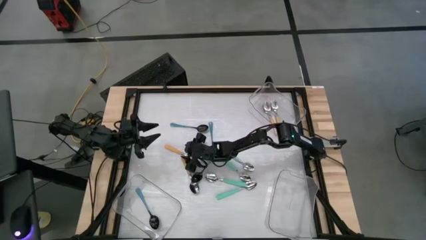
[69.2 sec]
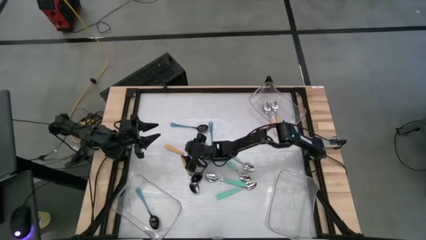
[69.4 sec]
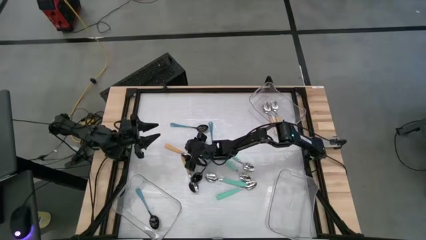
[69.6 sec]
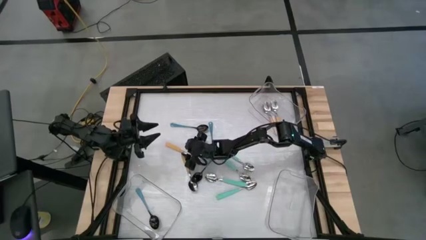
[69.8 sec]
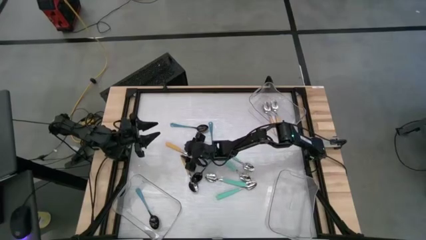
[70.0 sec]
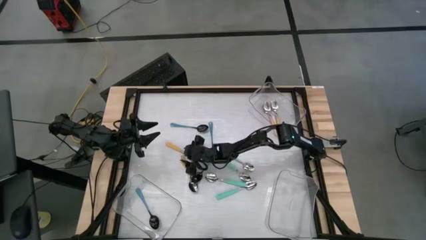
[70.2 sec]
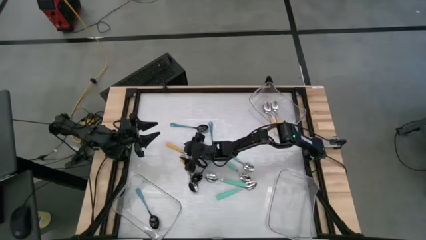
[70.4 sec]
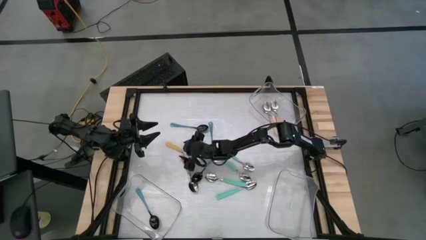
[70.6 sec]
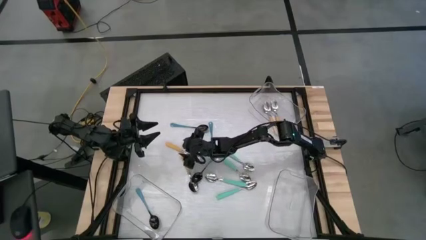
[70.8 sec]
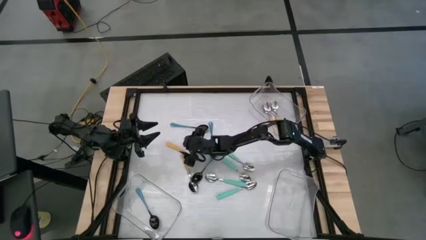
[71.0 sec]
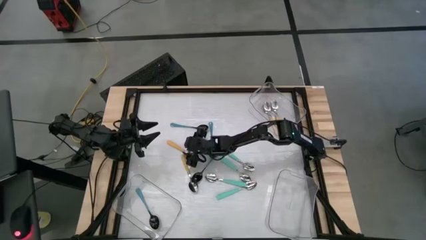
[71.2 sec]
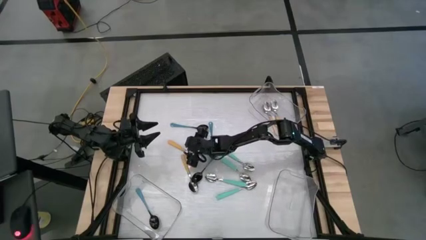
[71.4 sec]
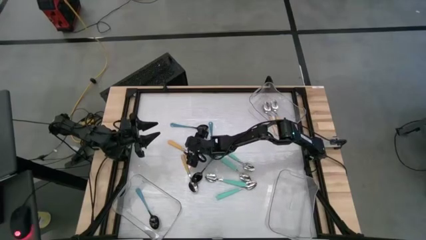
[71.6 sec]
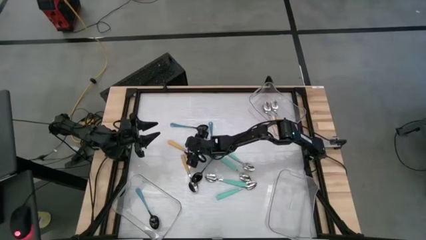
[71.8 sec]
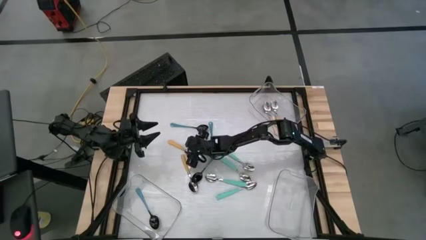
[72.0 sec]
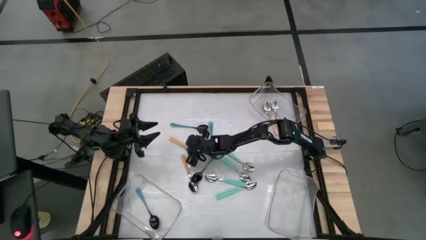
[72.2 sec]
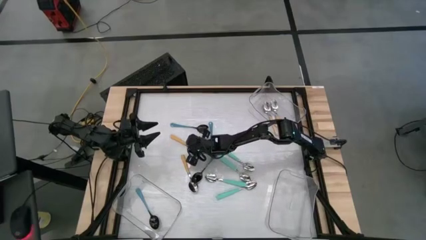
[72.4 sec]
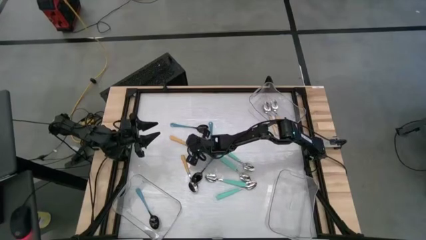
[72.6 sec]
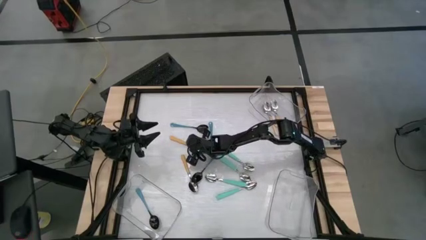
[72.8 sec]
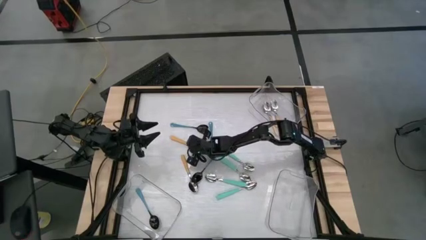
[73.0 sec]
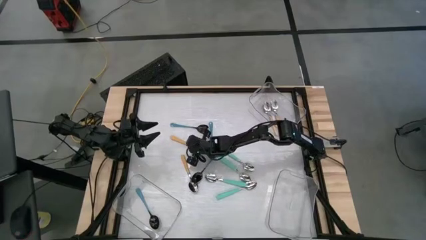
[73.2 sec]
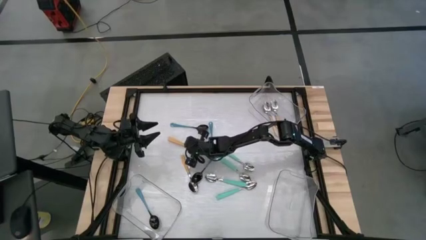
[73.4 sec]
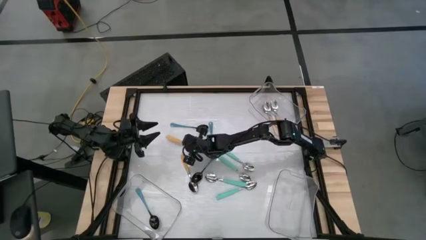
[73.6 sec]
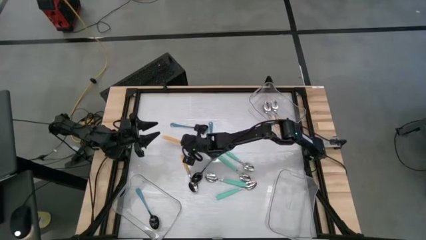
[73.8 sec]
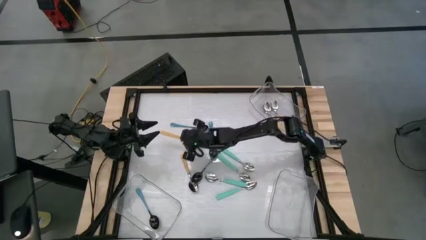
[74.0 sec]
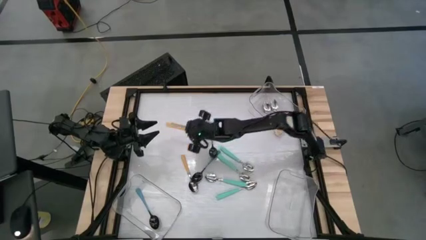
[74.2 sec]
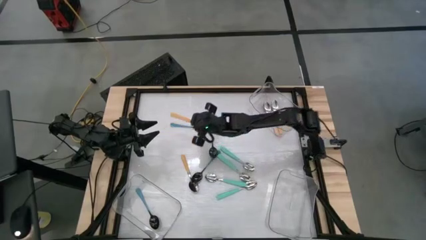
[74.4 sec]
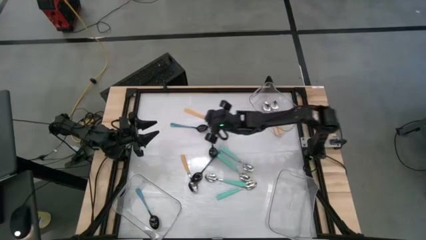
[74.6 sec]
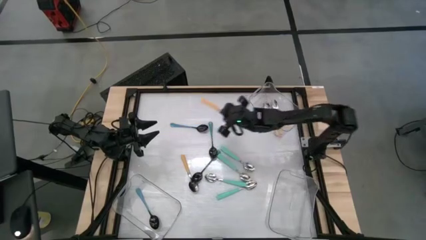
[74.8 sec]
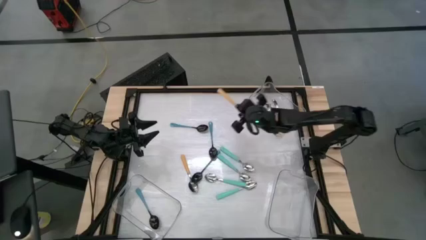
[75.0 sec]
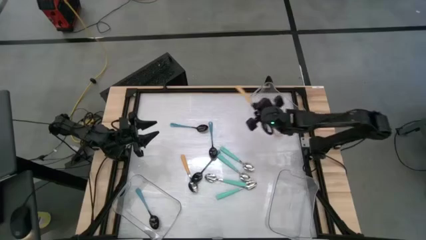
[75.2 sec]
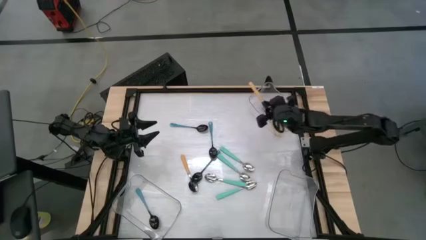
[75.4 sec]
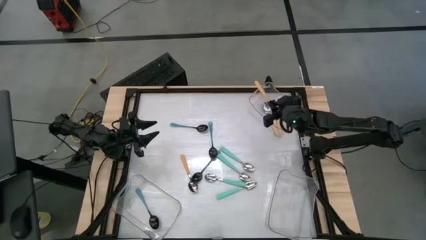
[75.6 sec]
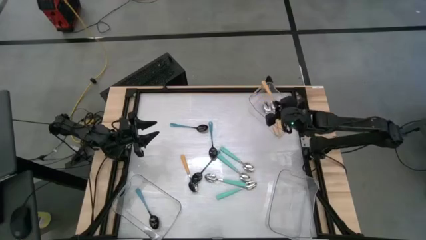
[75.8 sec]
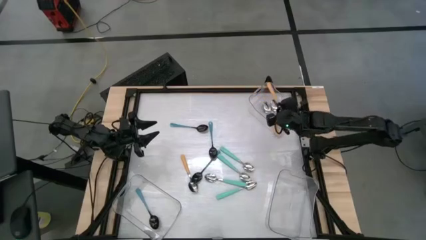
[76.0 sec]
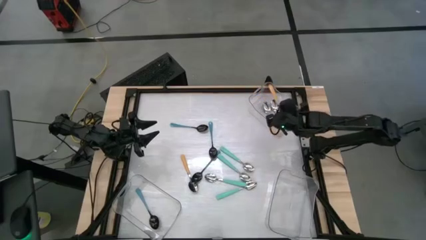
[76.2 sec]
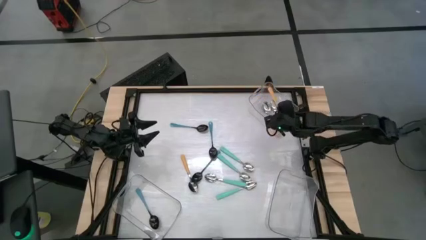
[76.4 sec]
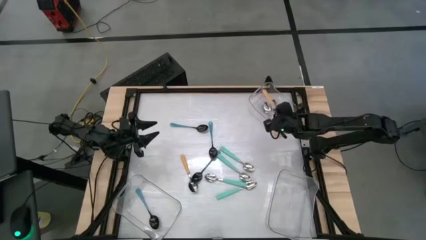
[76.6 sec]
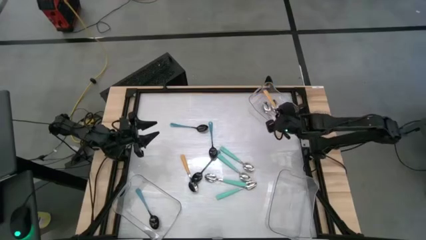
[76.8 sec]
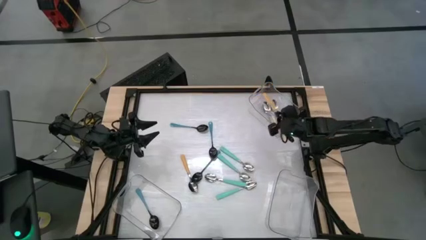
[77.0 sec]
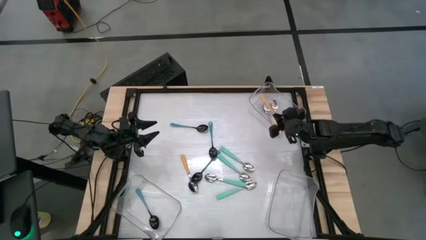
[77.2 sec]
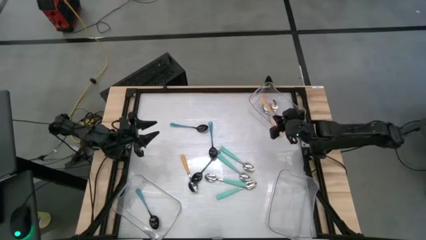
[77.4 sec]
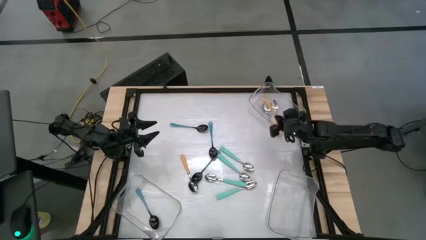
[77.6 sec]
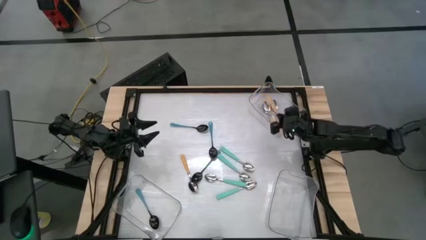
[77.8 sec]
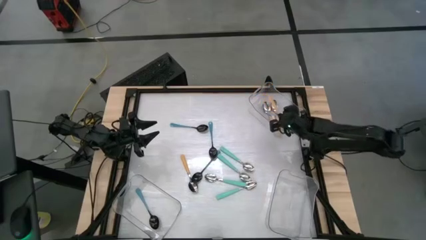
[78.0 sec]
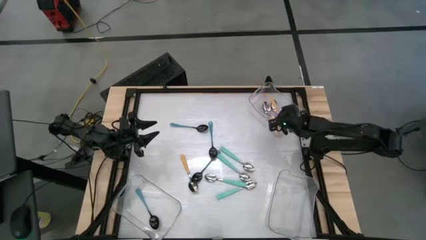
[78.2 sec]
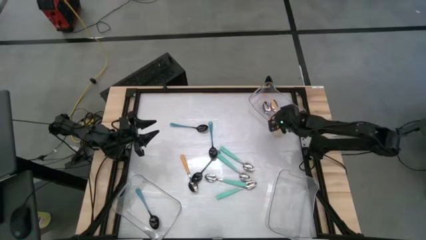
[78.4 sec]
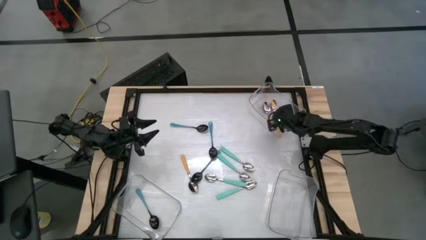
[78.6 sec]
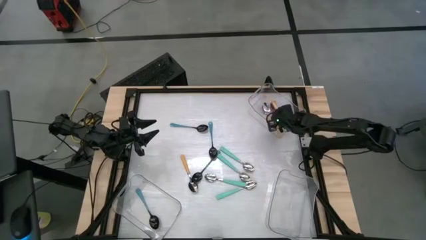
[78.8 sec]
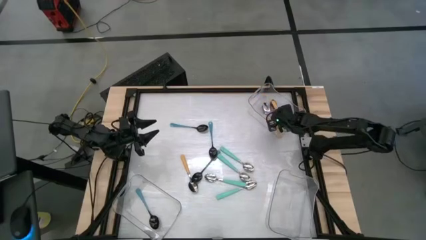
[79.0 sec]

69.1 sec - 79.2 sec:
Task: Sort silverware by color (type)
Put the yellow spoon into the top transparent bin

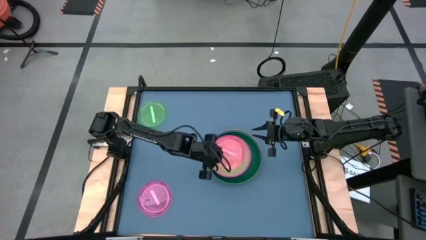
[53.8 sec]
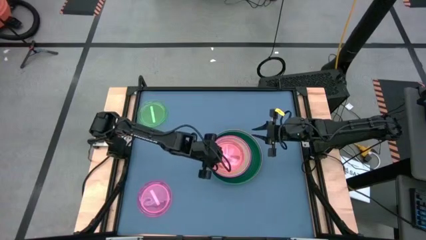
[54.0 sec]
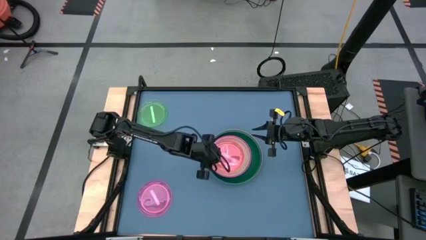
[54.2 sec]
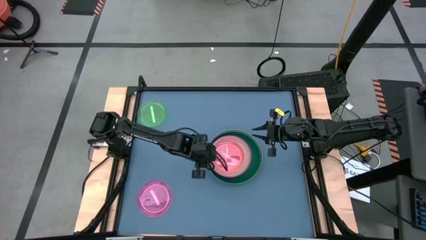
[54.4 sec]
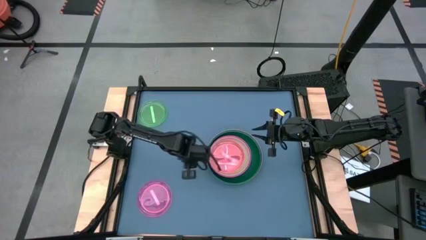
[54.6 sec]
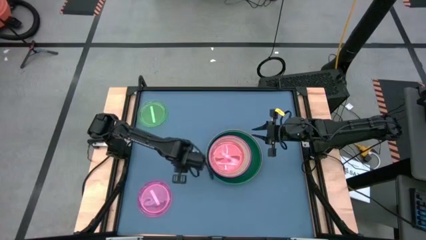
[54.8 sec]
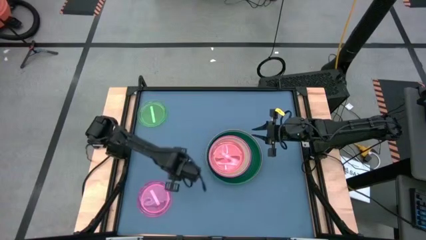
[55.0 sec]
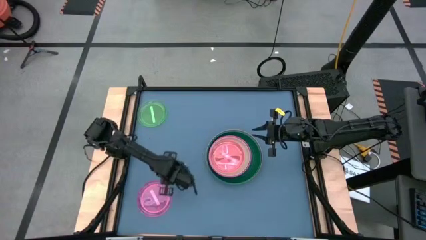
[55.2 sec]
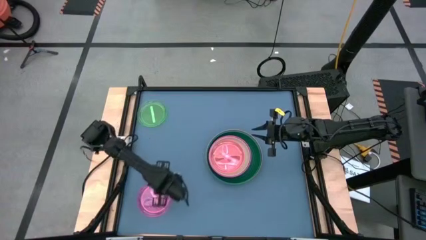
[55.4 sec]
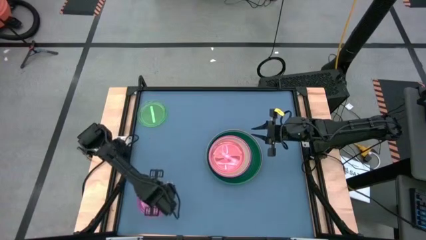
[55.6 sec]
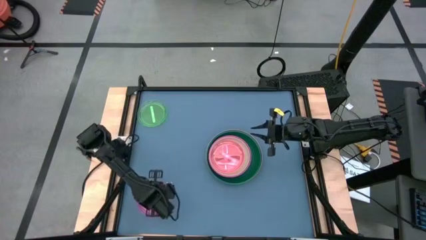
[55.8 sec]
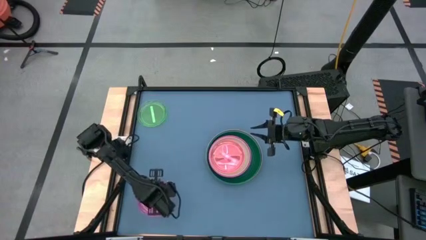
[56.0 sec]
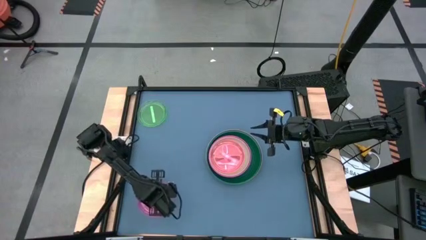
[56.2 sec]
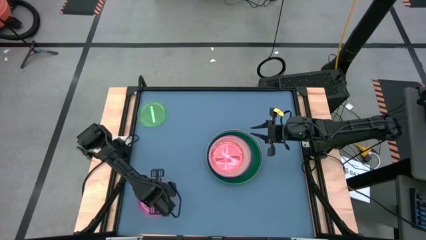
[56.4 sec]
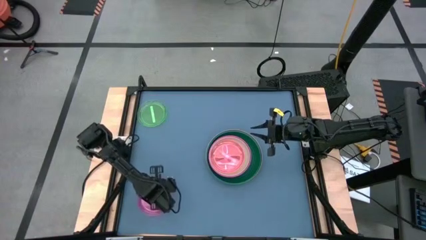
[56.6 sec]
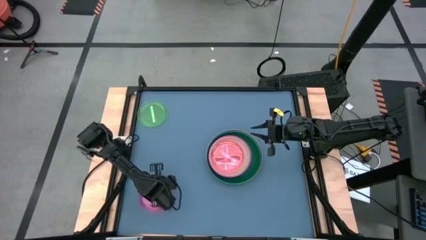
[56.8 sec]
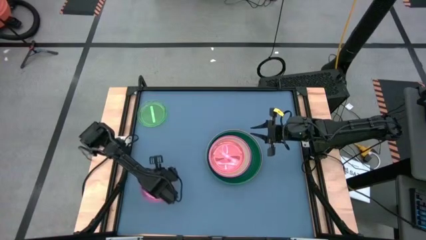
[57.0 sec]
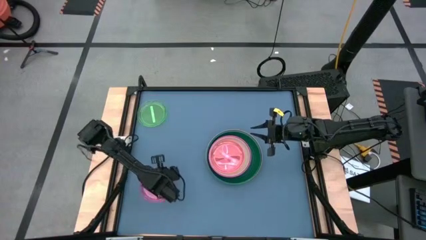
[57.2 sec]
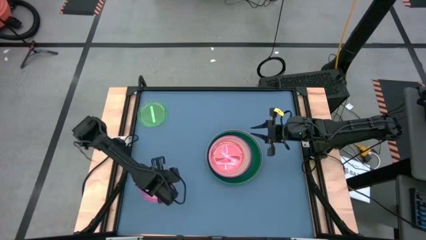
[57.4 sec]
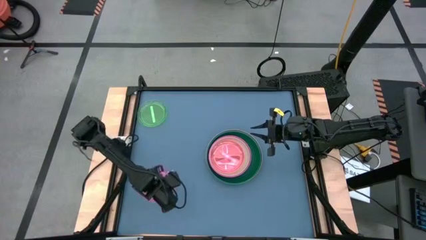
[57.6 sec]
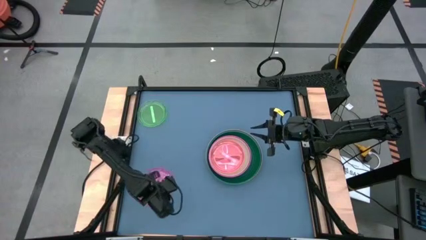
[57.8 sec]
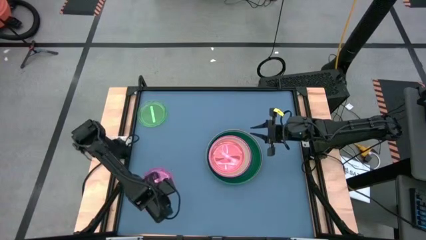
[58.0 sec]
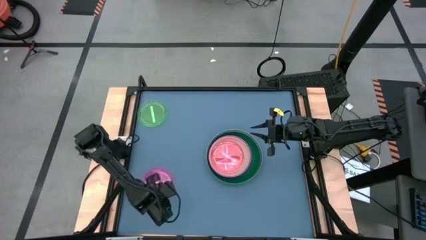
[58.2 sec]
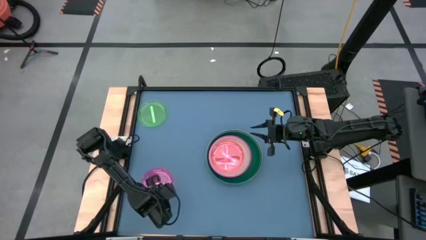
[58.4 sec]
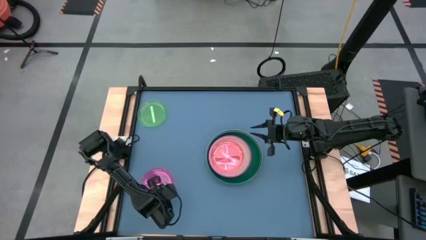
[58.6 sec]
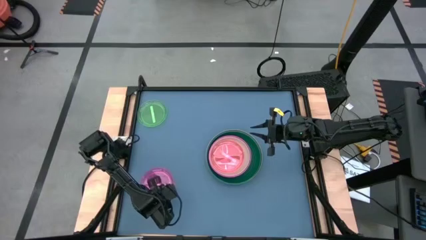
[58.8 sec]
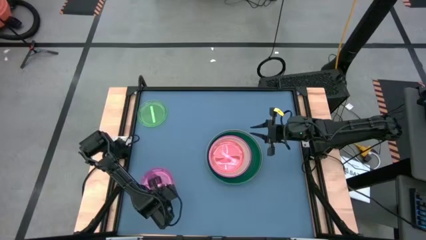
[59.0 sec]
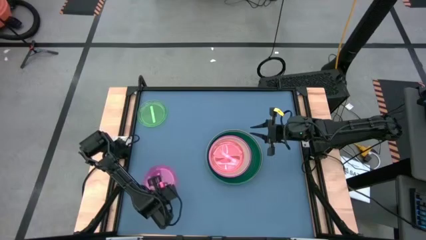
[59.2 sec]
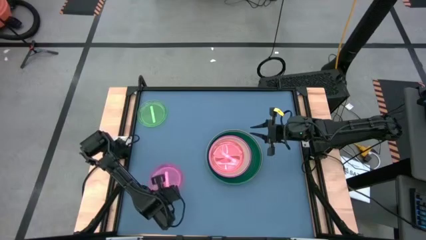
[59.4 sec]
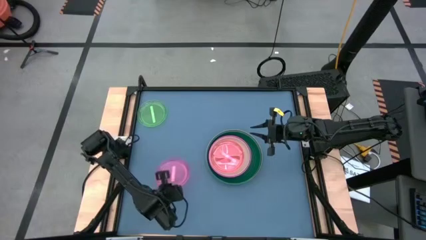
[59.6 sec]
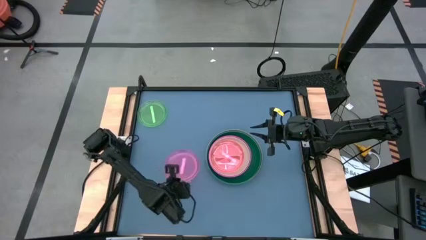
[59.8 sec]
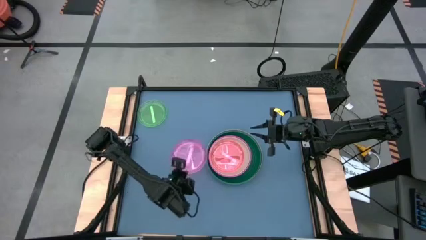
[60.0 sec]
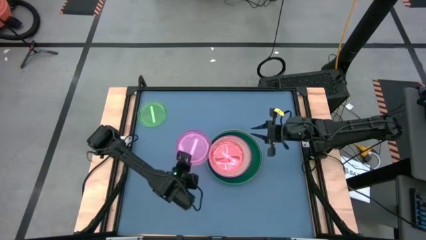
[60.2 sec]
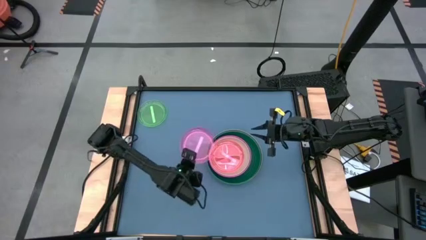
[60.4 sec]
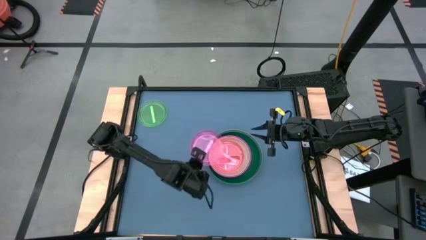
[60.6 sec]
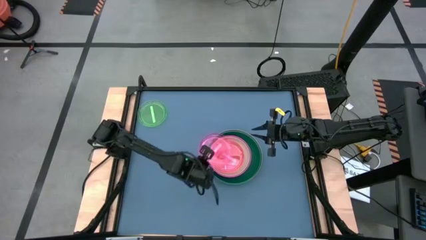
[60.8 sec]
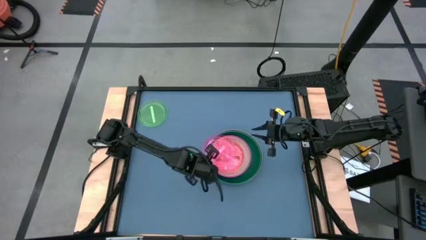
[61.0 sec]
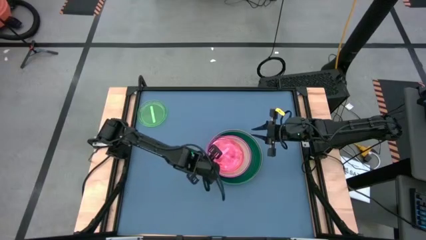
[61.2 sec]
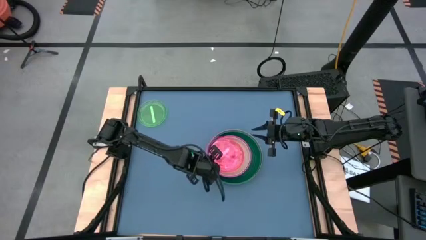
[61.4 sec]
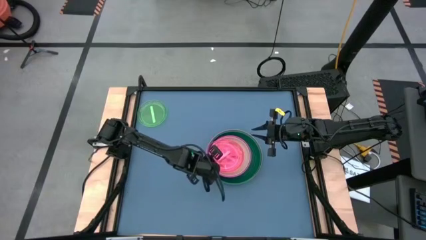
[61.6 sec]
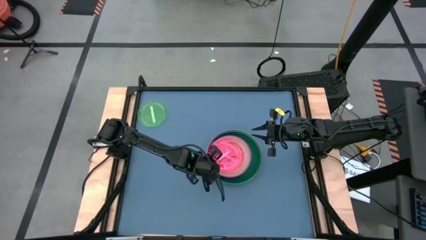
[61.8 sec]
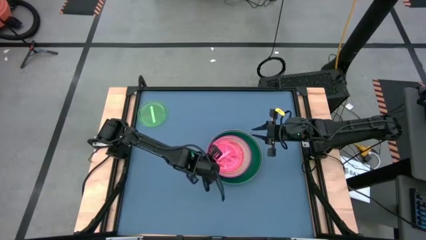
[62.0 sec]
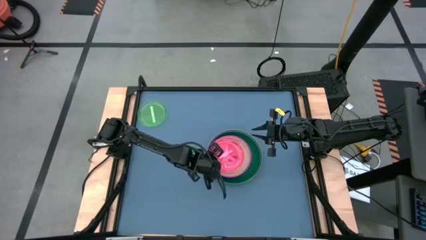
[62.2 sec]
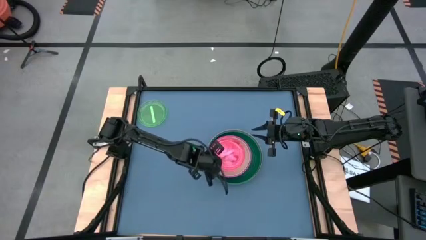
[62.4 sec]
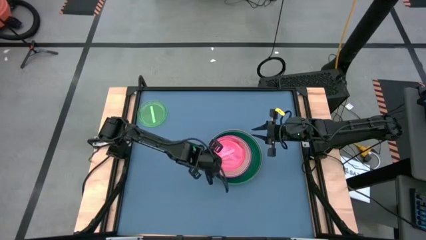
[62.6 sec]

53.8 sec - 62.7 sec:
Task: Stack plastic plates
Stack the light pink plate on top of the other light pink plate
